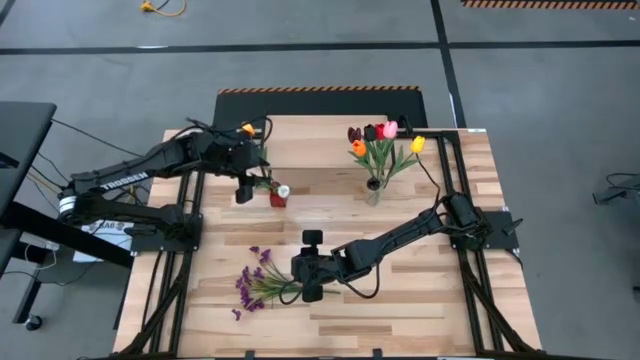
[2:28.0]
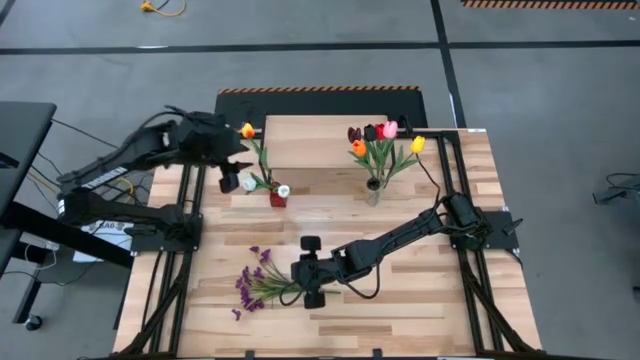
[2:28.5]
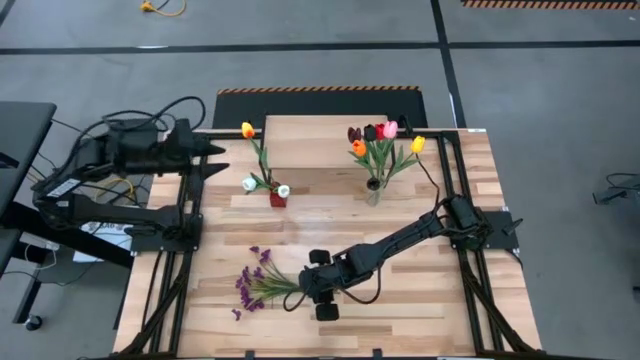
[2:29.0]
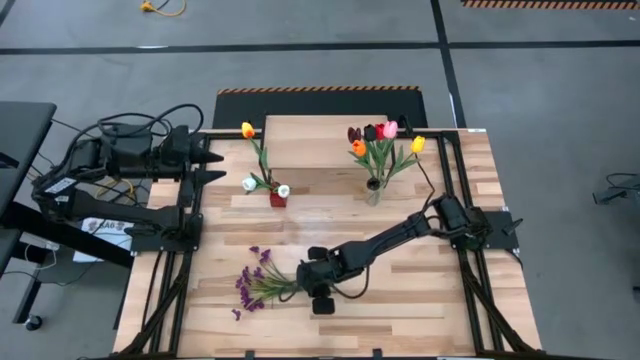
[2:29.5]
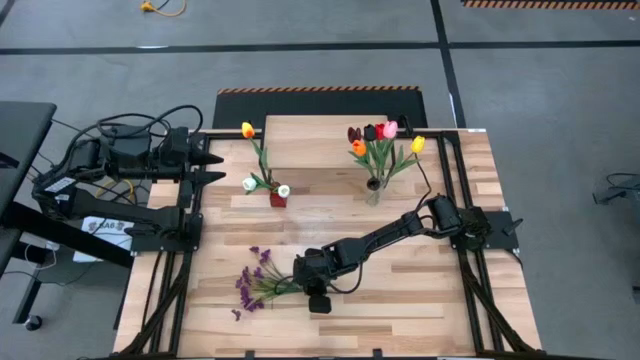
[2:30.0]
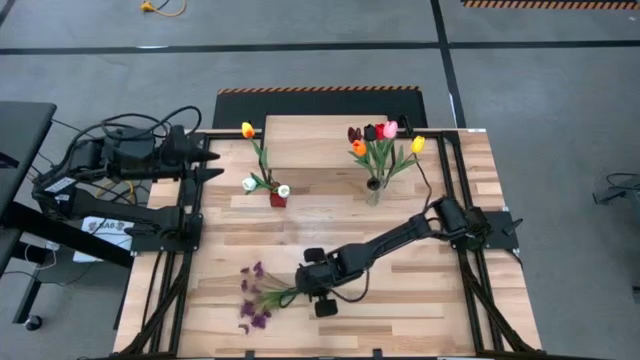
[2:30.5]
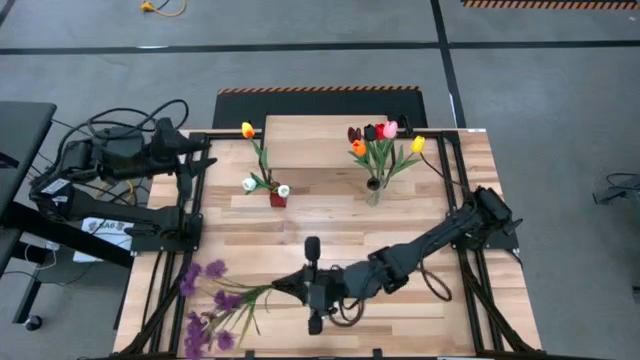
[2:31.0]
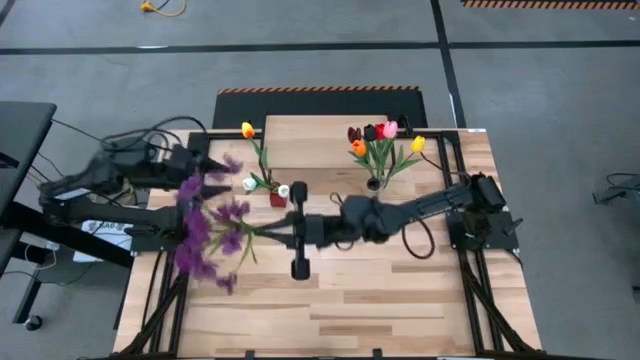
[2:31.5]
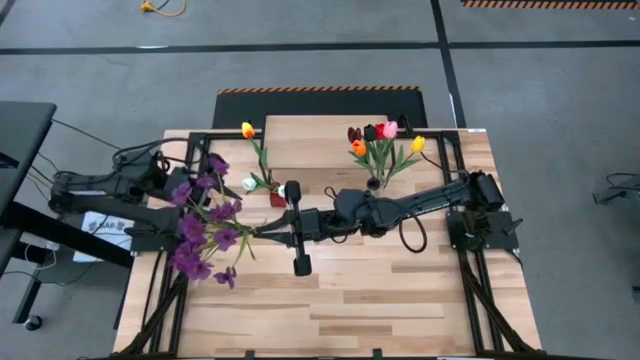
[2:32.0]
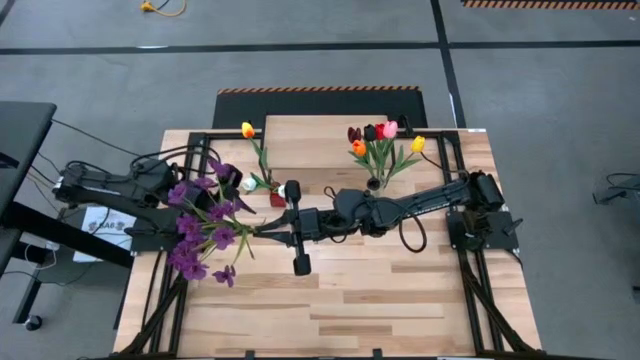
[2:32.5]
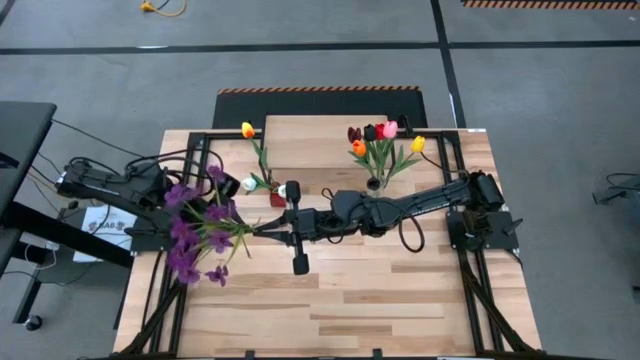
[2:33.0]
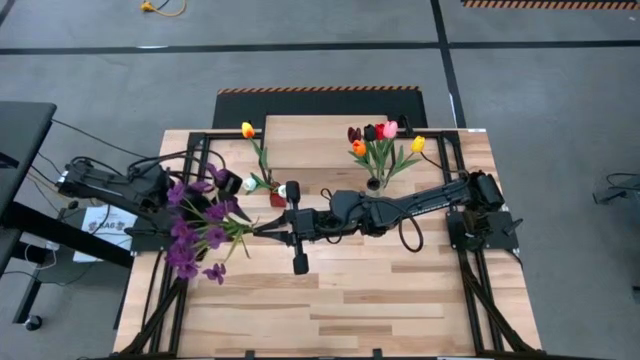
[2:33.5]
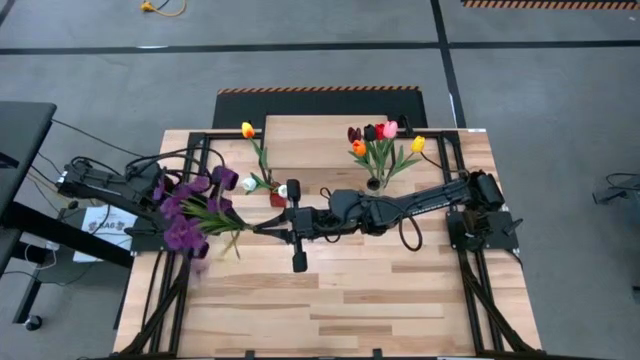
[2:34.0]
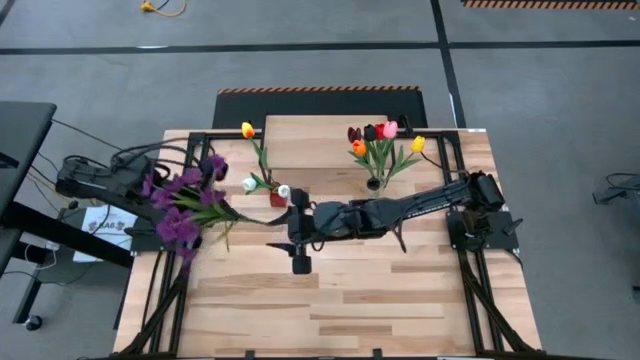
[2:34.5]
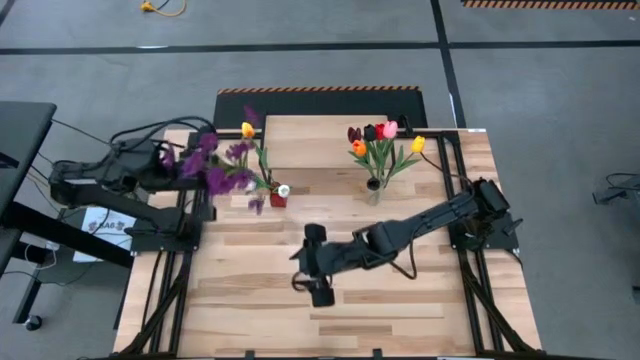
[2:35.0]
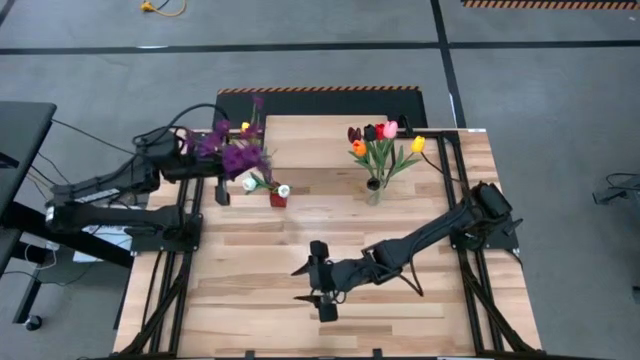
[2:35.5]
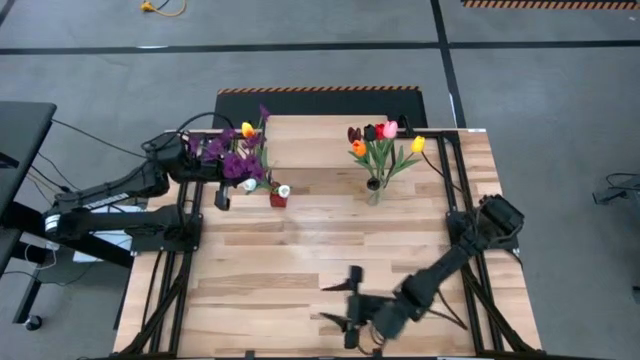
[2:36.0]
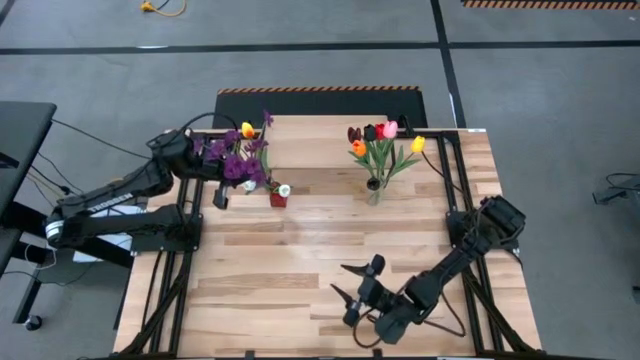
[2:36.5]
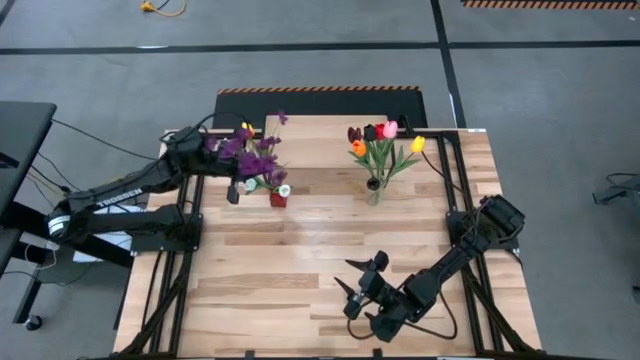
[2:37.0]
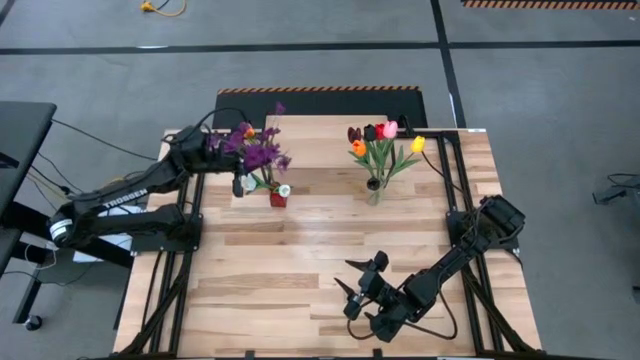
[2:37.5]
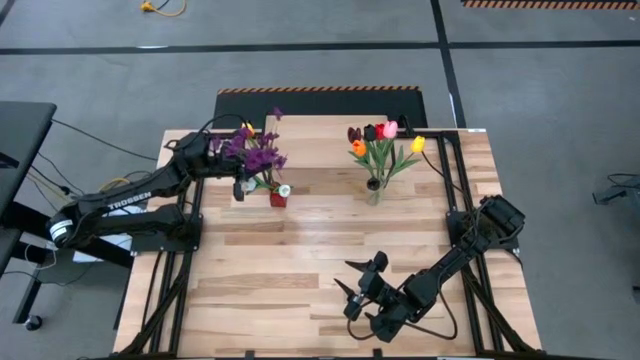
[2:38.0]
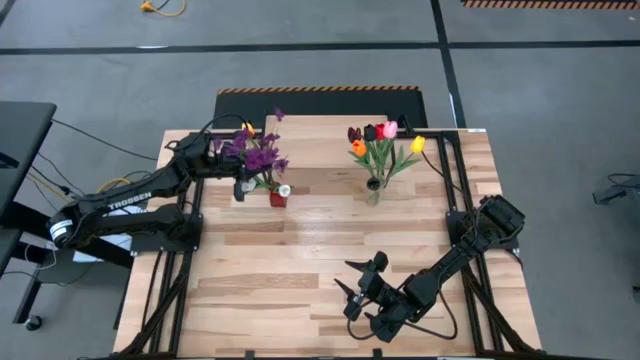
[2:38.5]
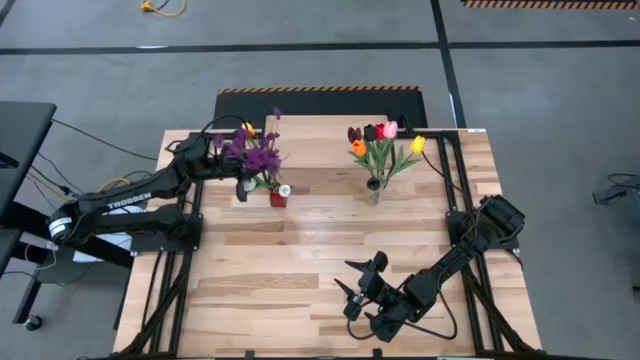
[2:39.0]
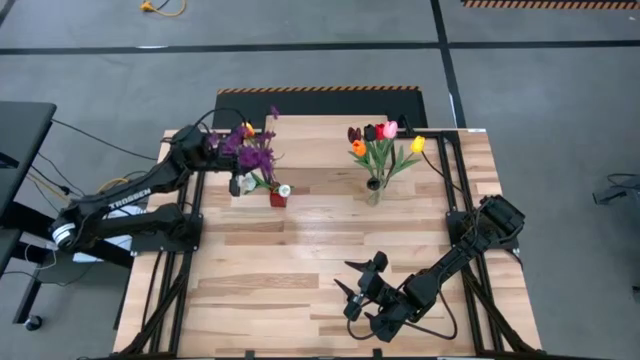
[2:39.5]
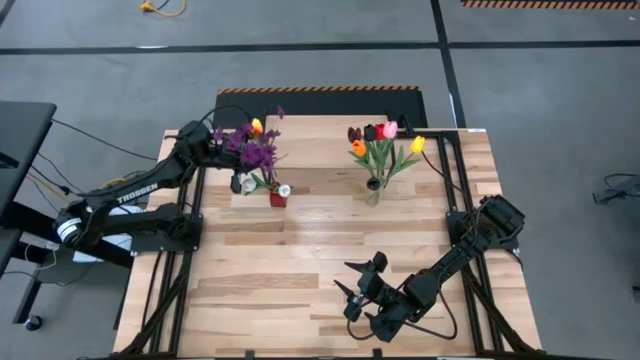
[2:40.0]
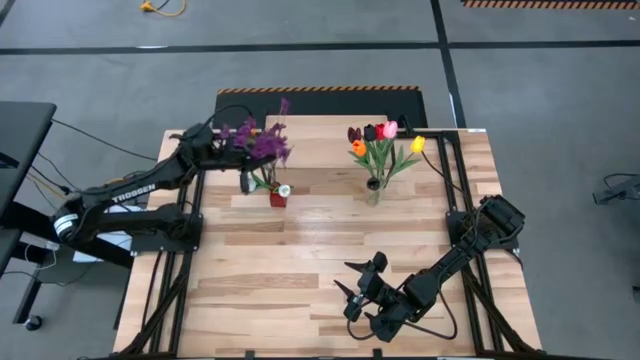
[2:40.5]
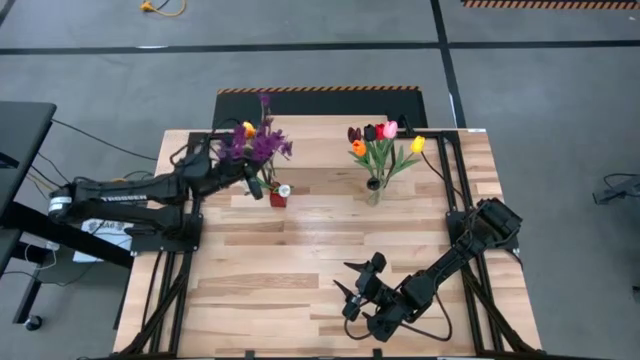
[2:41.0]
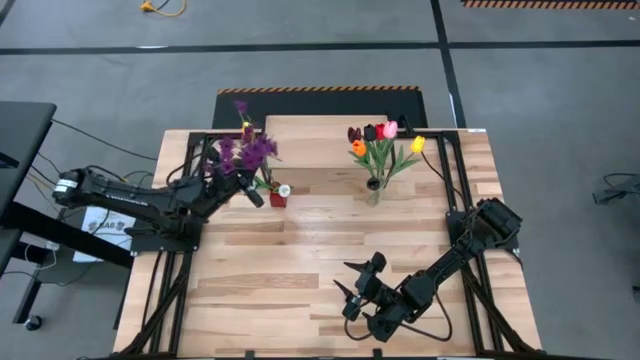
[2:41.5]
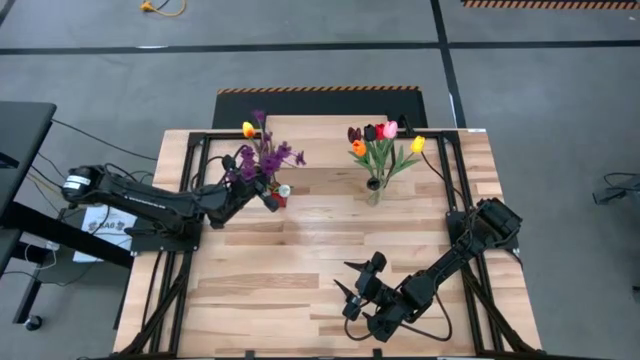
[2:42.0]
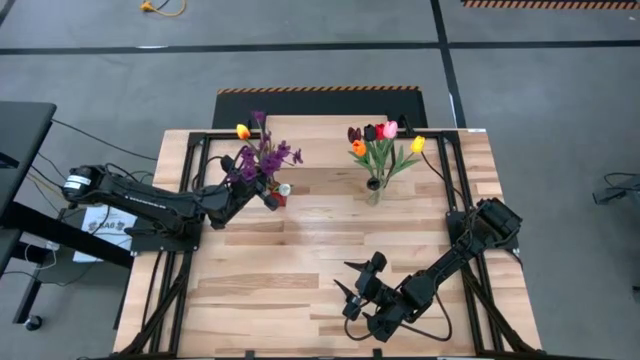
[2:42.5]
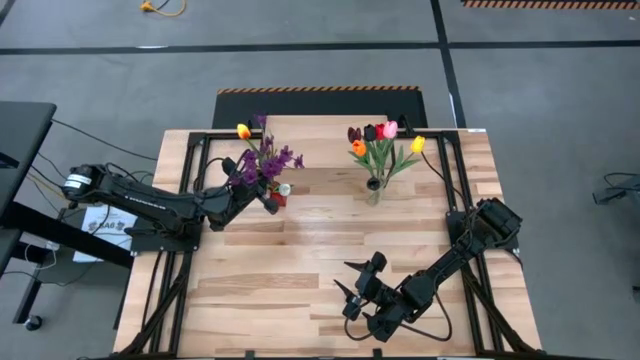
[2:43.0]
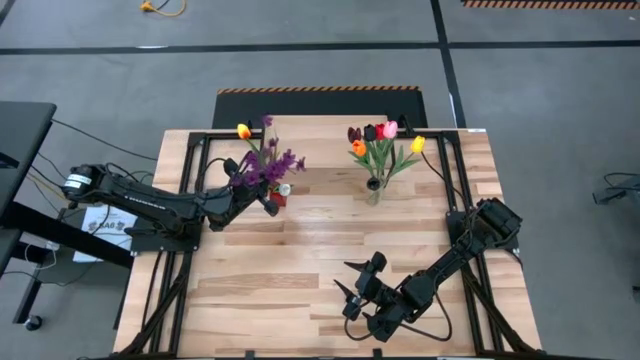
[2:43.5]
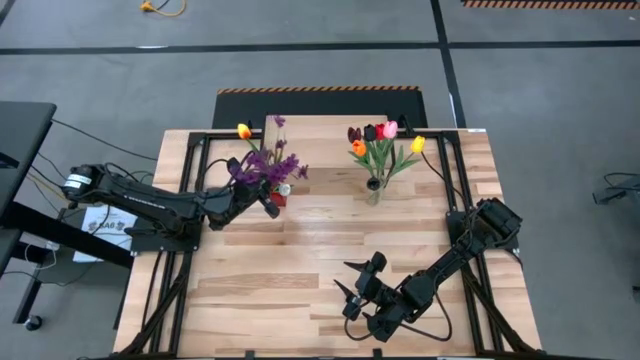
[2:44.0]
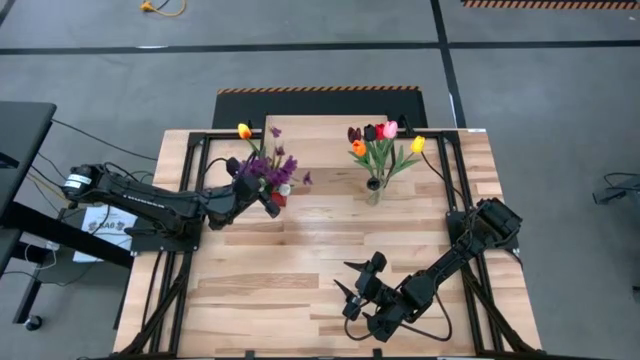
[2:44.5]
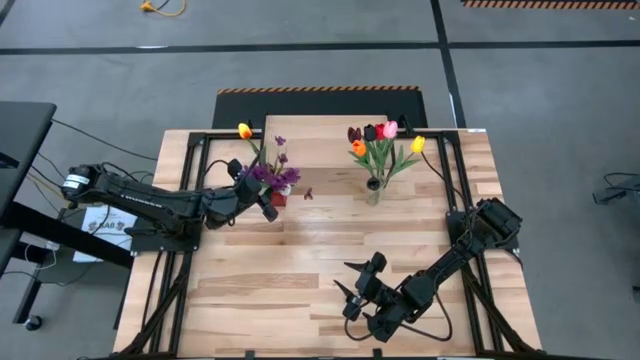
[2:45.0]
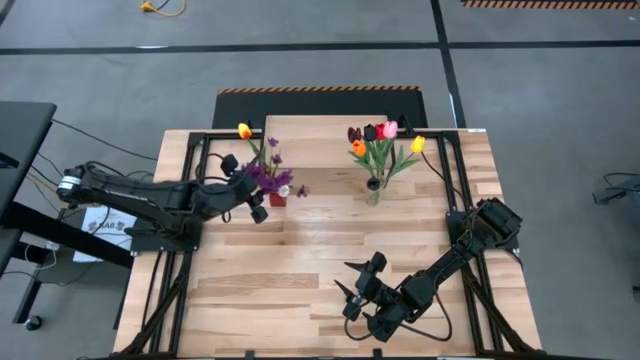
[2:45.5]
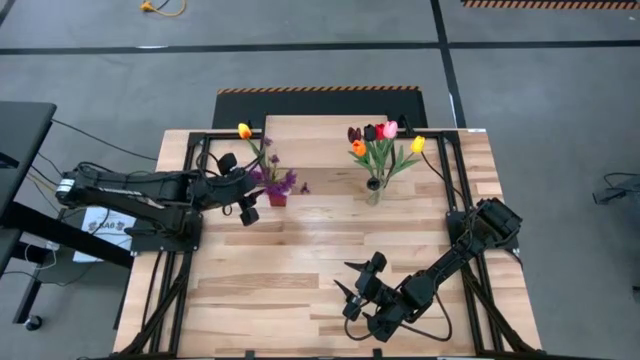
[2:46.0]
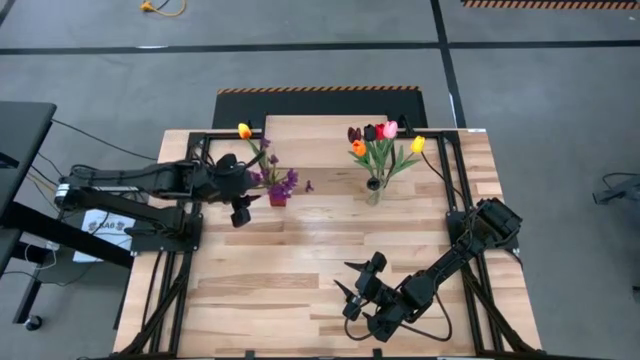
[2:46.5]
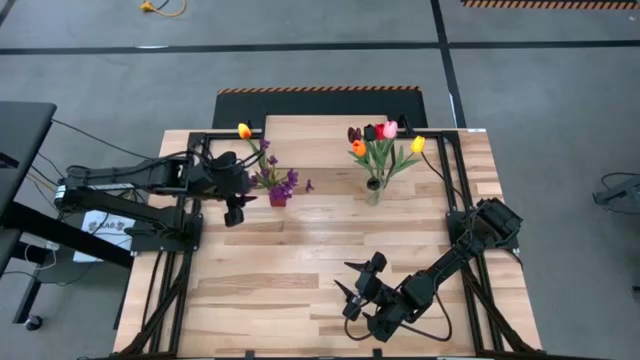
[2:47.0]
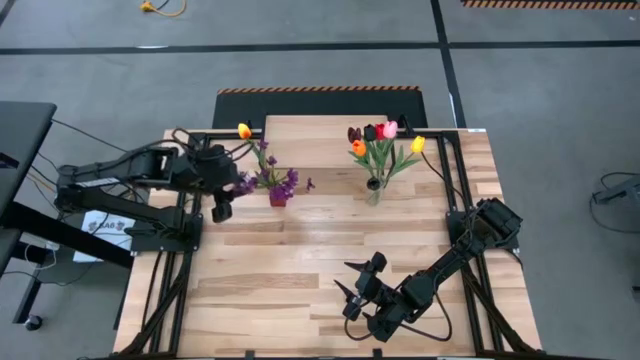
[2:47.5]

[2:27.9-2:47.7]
Task: Pick and place flowers into a vace then onto a shelf
Put the purple flowers into the red vase

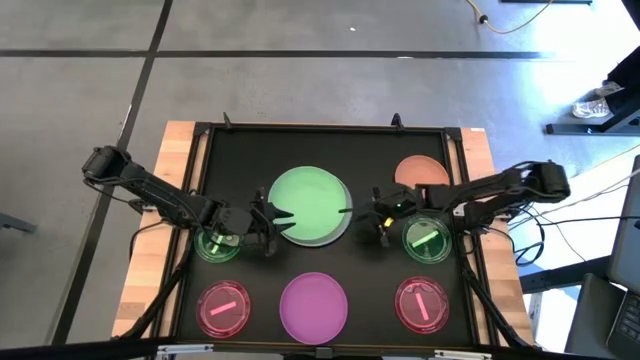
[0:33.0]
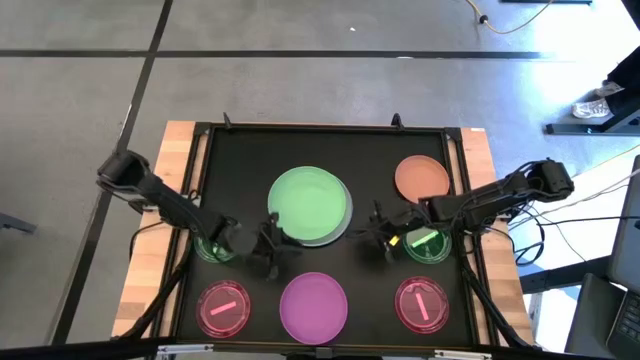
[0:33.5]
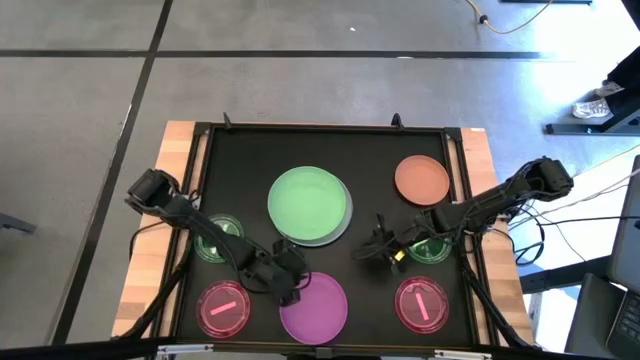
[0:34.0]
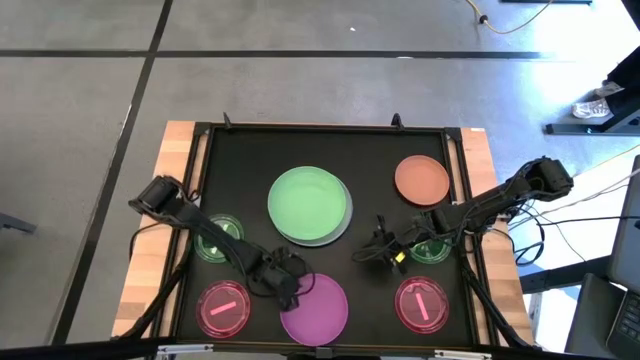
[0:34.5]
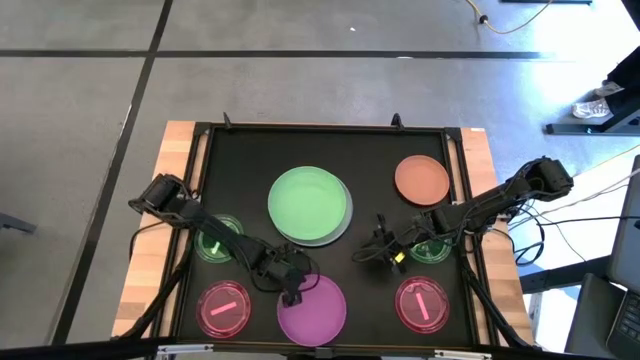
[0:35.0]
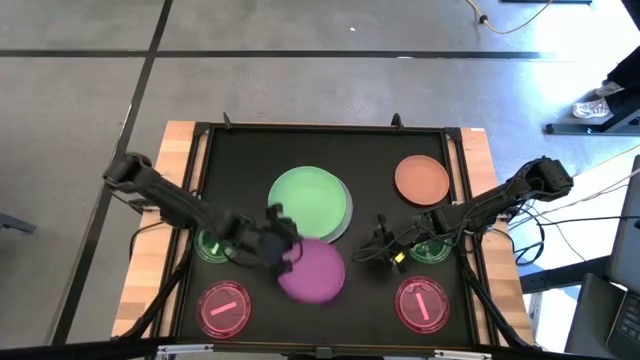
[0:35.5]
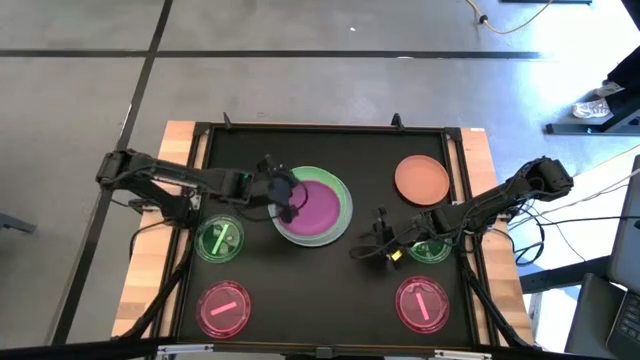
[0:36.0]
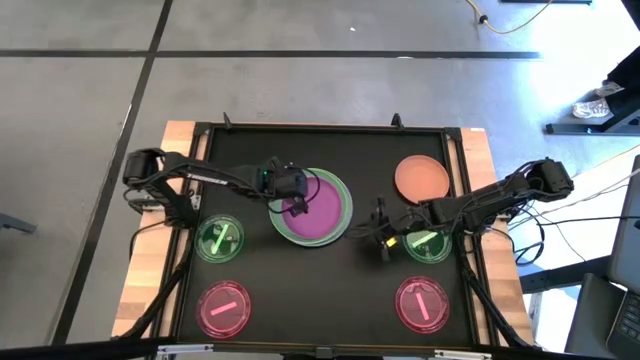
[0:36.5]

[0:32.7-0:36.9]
Task: Stack plastic plates
Stack the pink plate on the green plate
